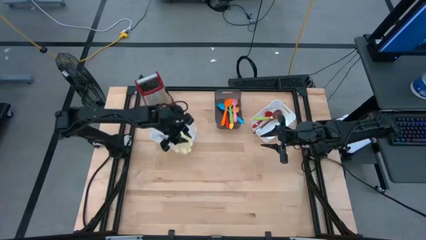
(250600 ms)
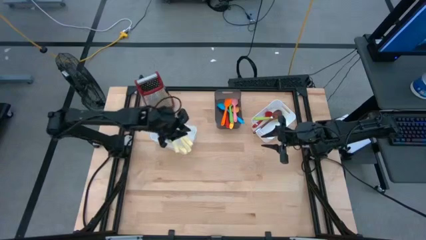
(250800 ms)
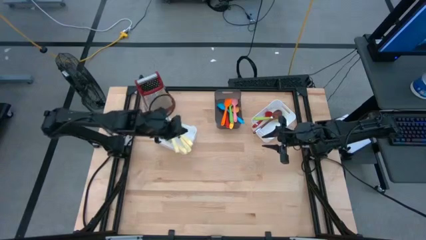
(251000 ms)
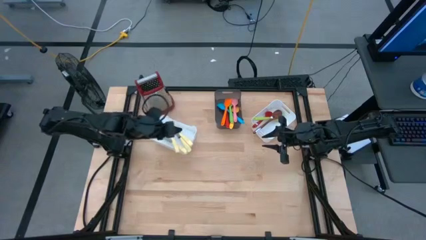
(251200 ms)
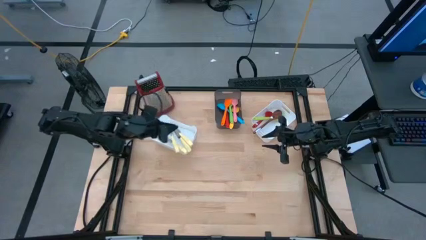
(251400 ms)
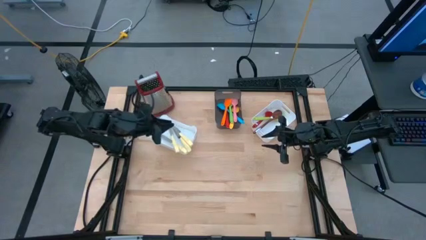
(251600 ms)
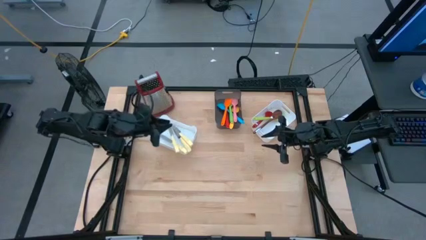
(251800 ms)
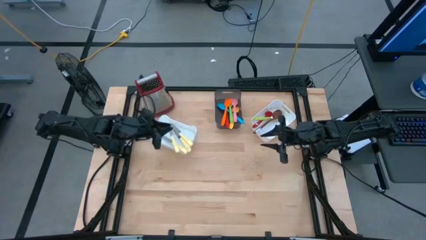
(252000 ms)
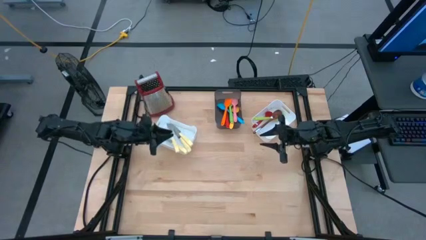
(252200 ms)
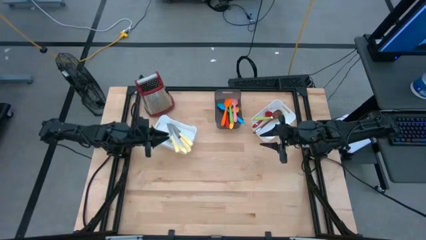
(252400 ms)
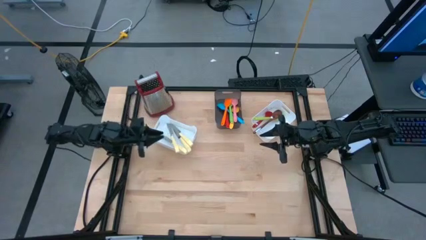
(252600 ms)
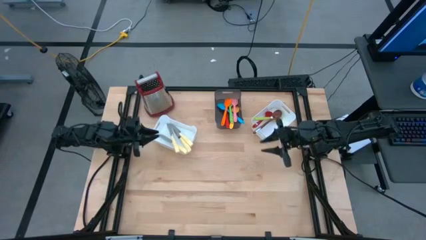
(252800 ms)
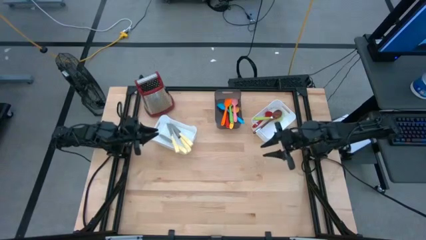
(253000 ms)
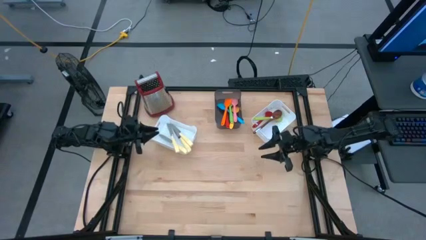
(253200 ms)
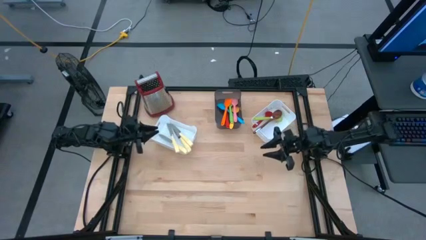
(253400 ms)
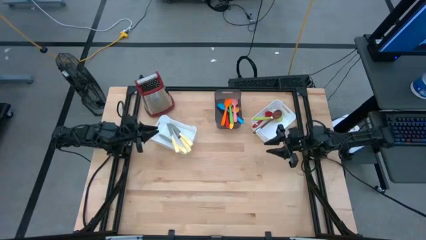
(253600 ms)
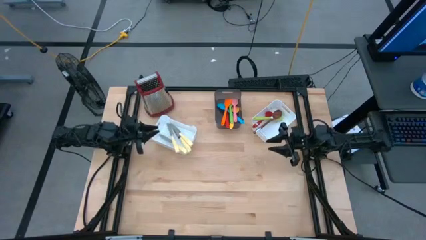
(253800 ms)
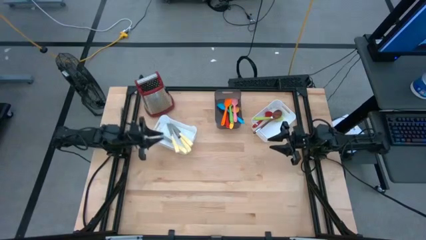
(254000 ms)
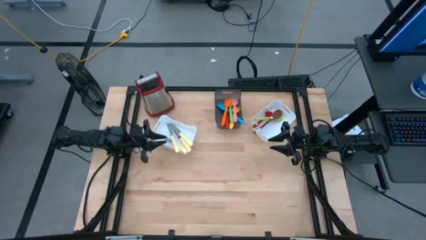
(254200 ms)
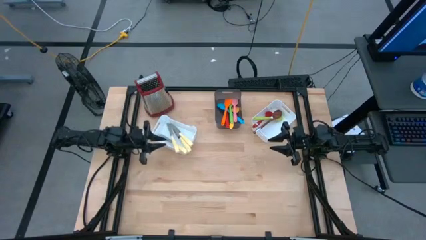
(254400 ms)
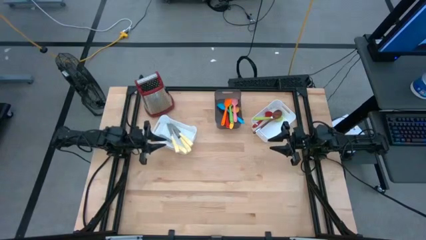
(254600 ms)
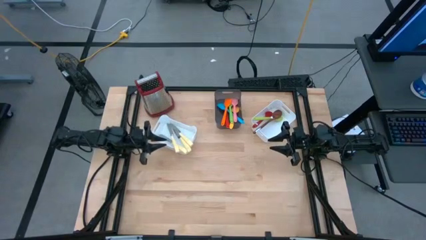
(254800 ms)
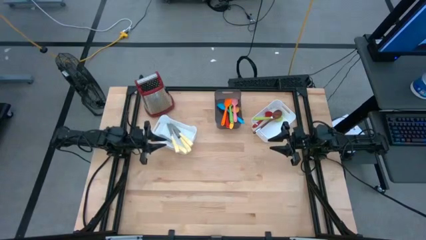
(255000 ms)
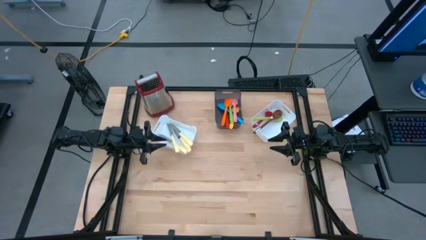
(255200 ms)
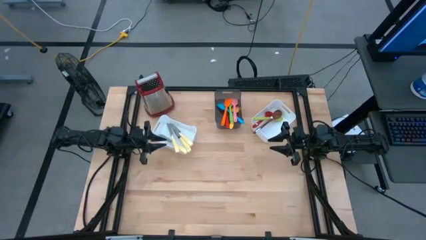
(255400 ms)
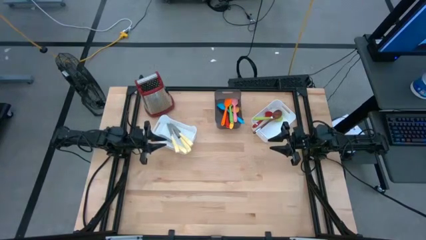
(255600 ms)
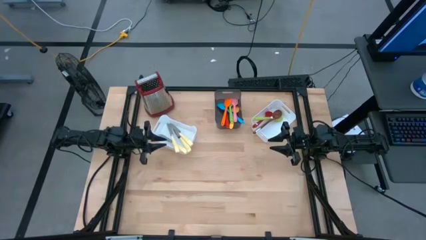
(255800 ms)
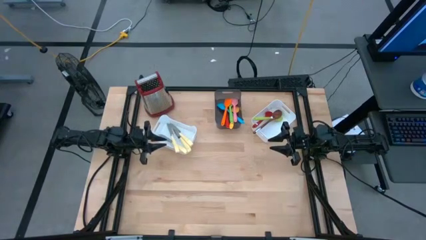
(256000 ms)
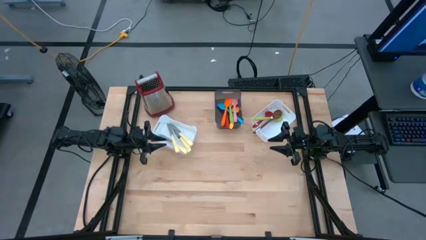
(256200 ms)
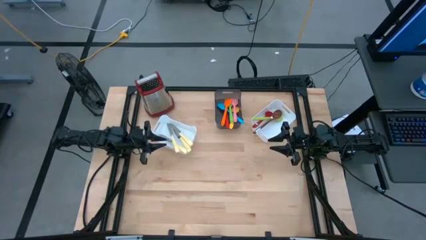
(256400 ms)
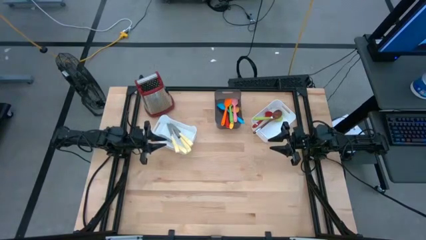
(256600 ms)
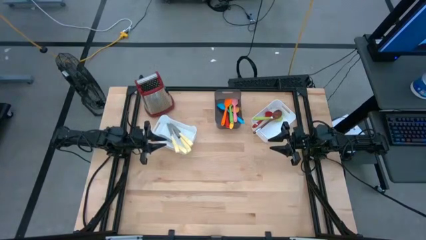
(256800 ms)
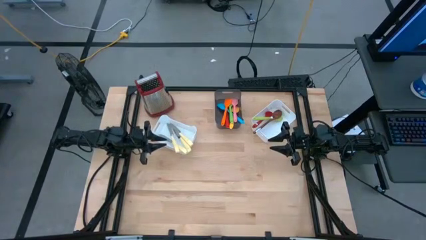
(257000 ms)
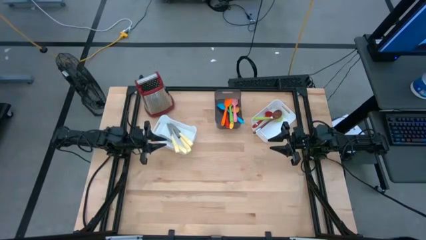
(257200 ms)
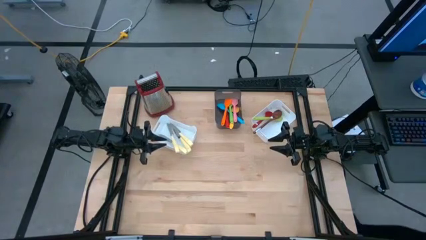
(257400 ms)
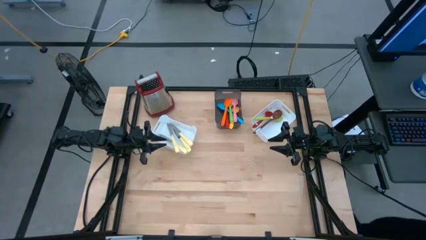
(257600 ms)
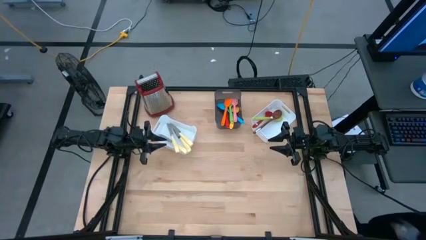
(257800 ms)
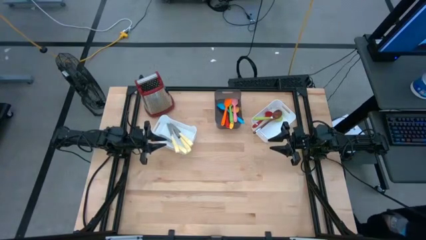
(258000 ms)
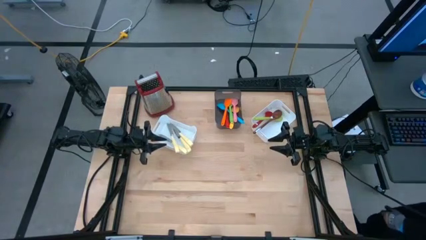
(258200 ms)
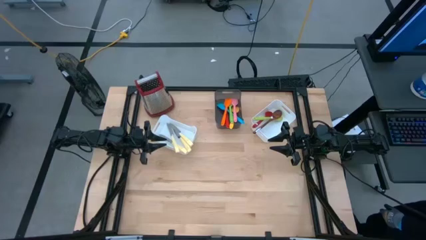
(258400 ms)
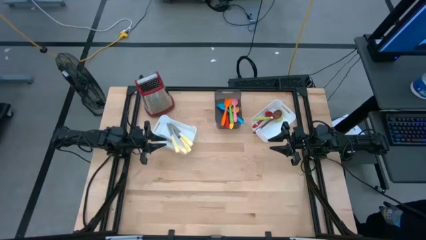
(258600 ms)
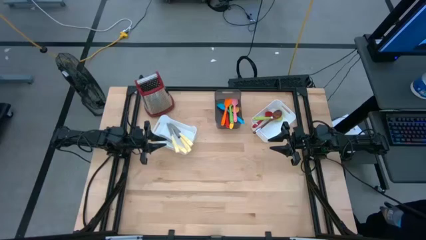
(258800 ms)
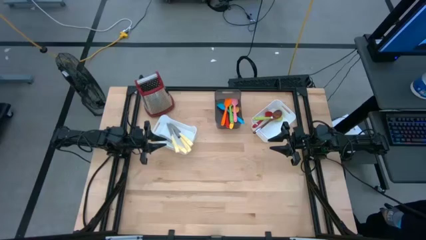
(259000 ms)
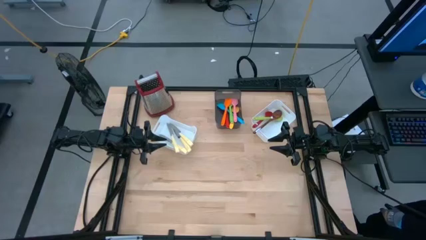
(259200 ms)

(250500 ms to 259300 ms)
Task: Pick & Place Kitchen Items
Return to Home Position

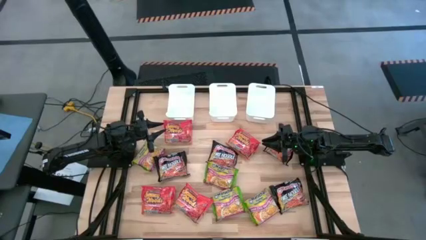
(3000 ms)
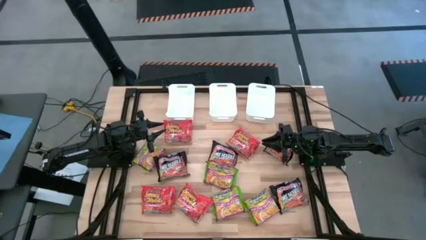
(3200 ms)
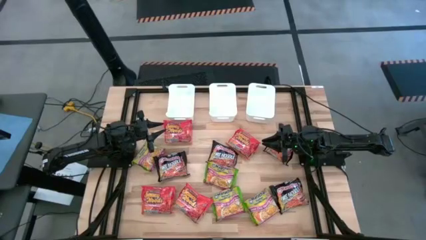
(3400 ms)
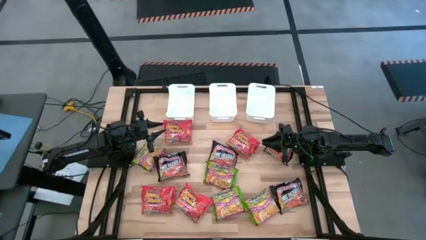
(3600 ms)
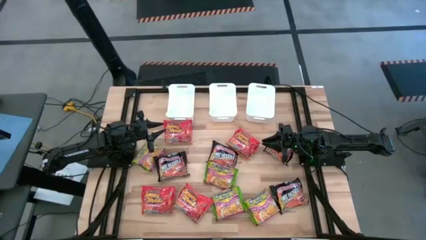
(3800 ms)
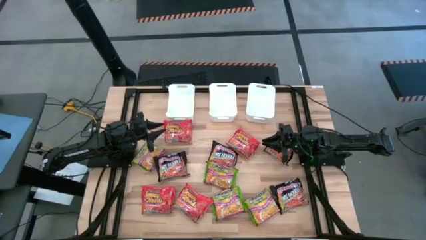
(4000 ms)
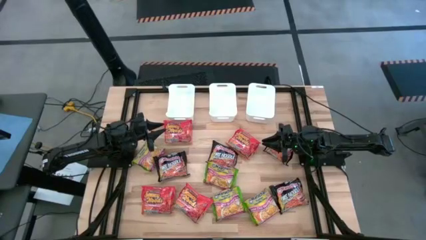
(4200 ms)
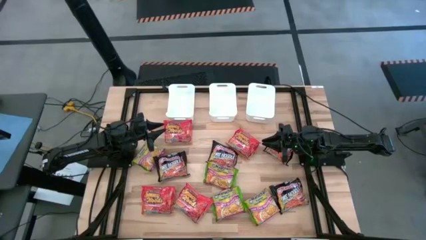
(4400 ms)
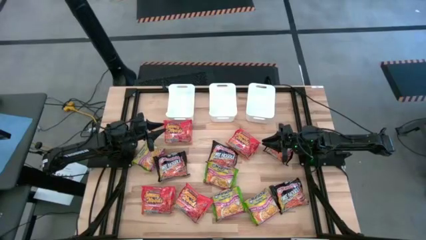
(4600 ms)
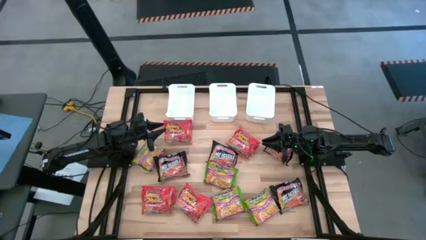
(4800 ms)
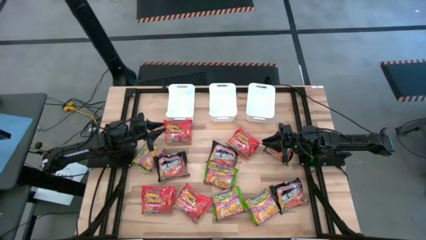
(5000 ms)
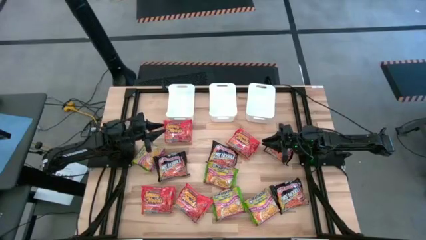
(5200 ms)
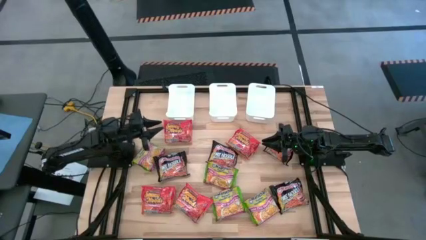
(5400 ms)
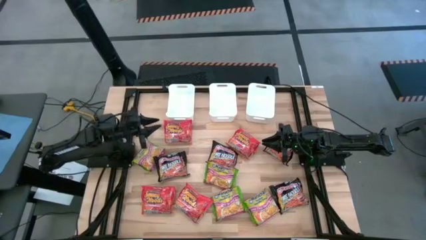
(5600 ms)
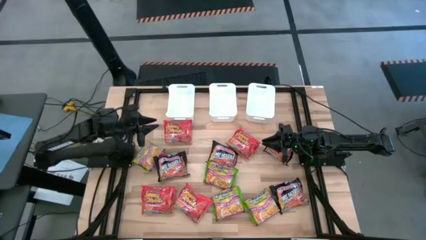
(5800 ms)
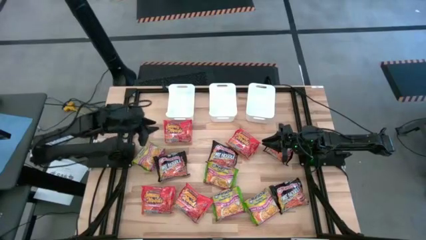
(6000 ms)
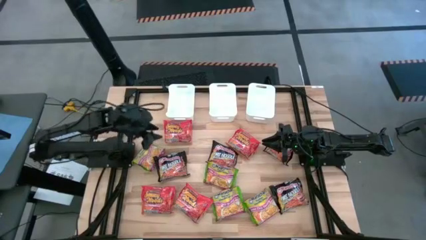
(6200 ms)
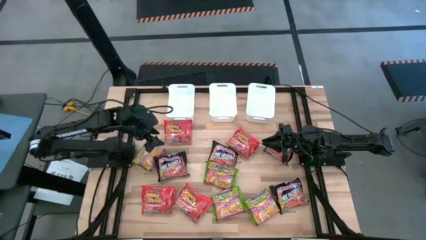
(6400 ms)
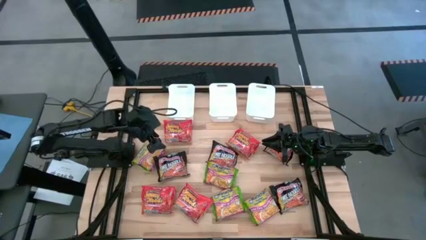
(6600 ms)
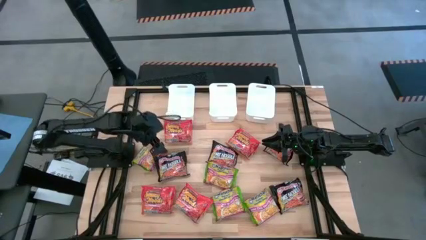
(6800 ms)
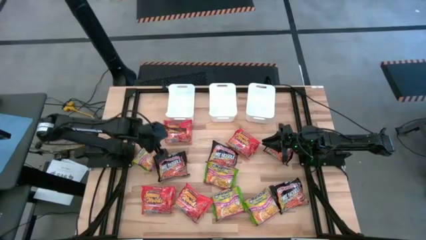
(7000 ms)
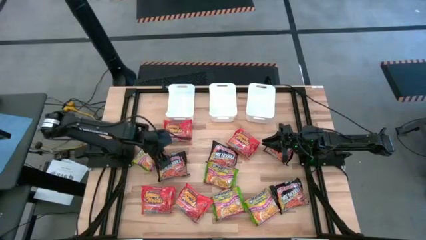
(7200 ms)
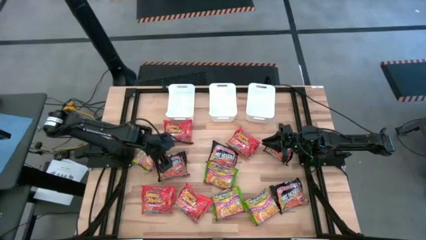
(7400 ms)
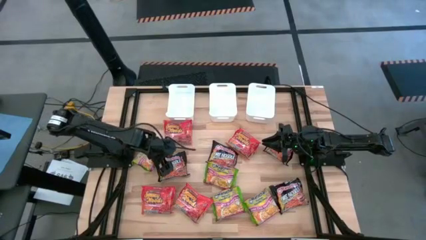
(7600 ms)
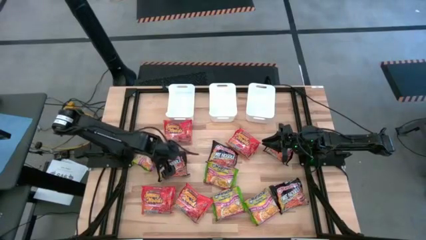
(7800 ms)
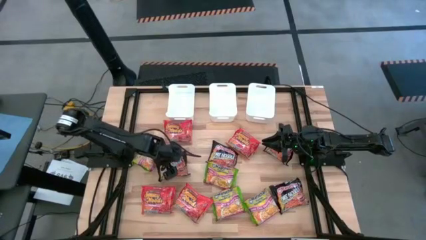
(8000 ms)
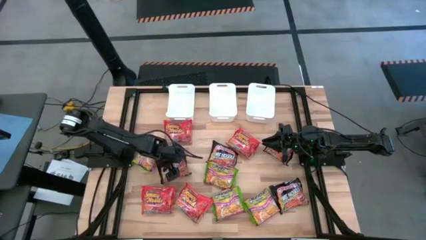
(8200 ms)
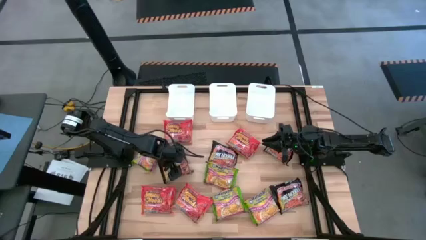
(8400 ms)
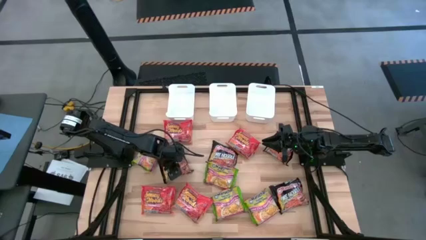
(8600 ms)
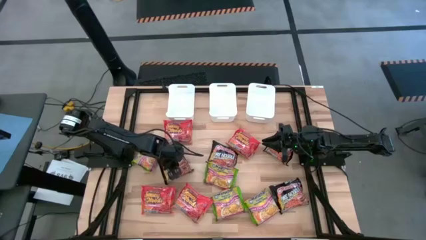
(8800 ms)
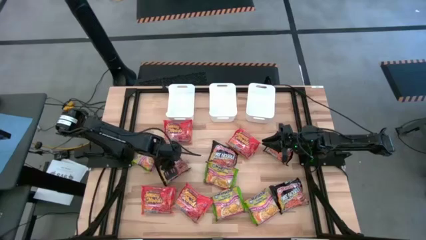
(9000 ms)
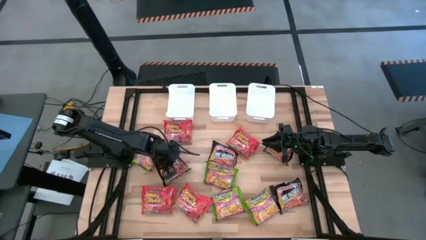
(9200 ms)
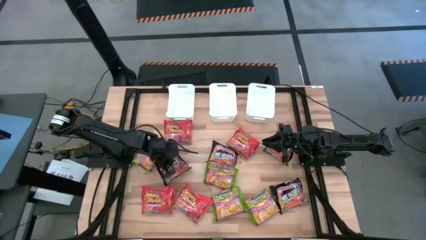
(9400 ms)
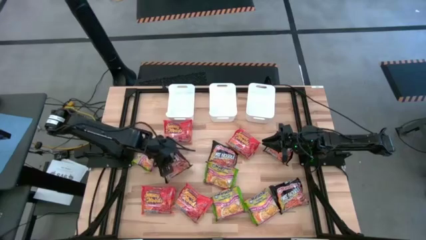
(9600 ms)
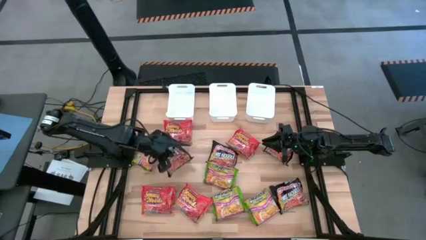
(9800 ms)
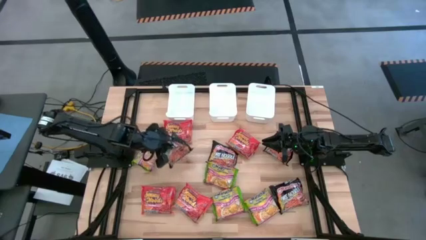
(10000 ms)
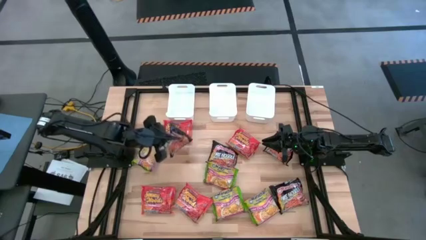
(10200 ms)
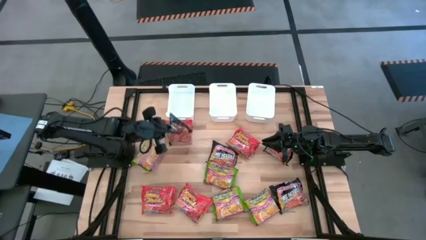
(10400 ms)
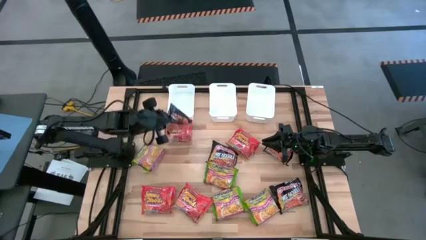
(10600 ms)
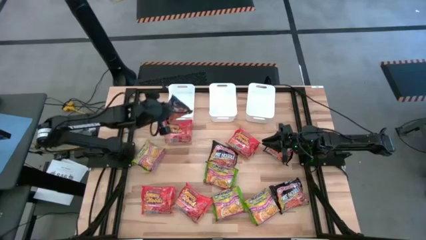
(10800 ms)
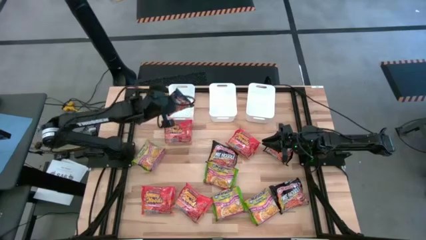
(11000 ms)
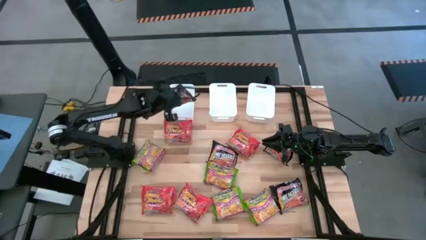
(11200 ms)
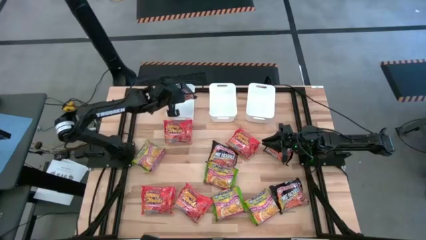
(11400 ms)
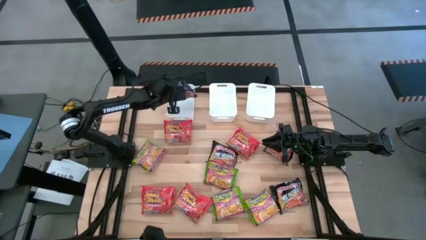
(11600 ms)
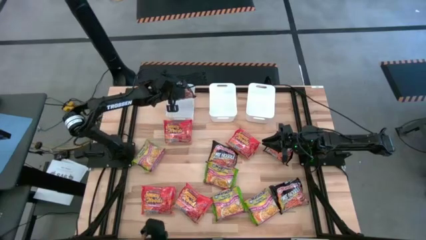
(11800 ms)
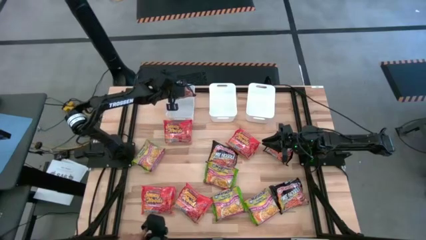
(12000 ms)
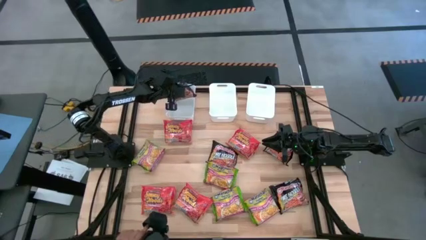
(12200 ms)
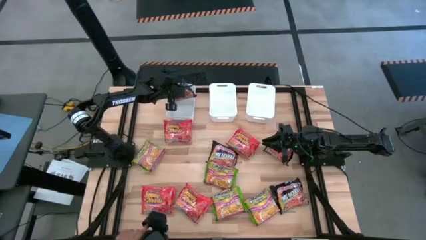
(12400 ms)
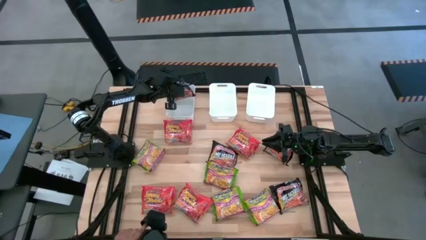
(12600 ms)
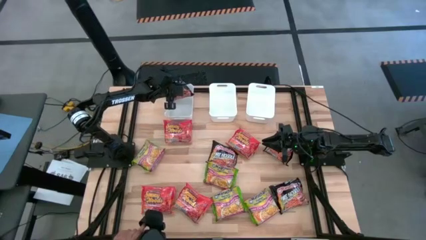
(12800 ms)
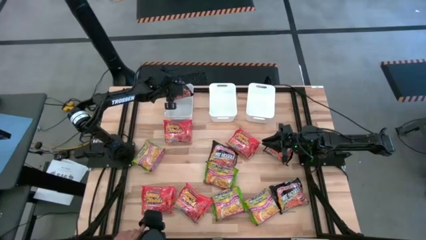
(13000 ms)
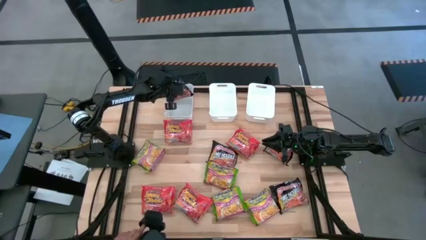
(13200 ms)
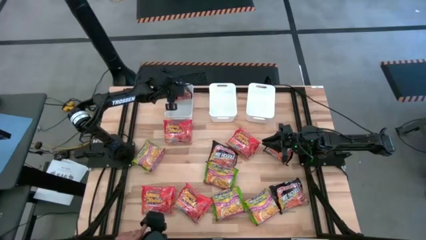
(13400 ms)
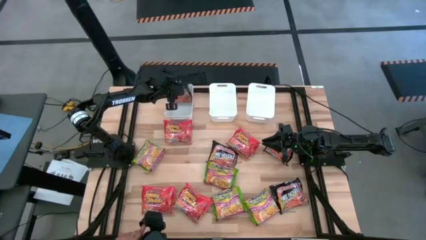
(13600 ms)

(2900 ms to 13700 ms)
Task: Sort Maruchan noodles
Put the black noodle pack into the left white bin
